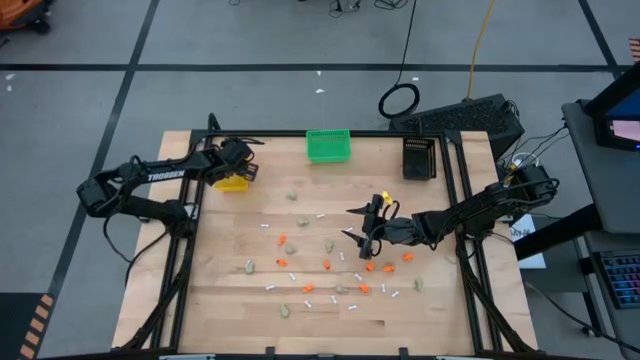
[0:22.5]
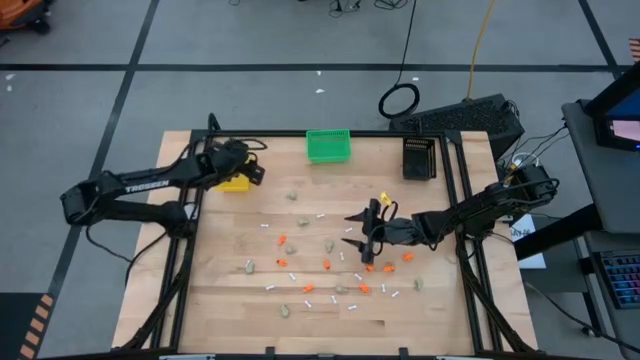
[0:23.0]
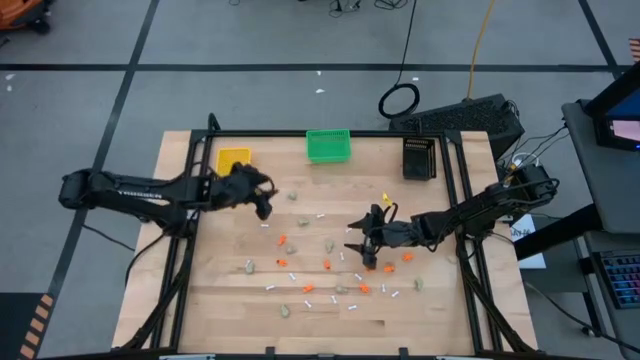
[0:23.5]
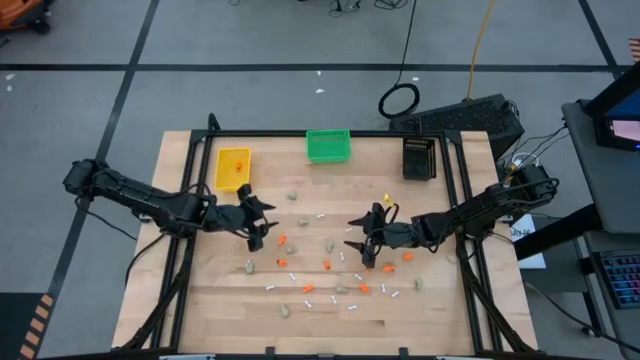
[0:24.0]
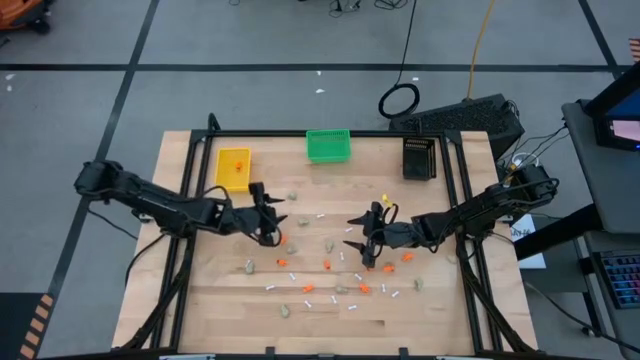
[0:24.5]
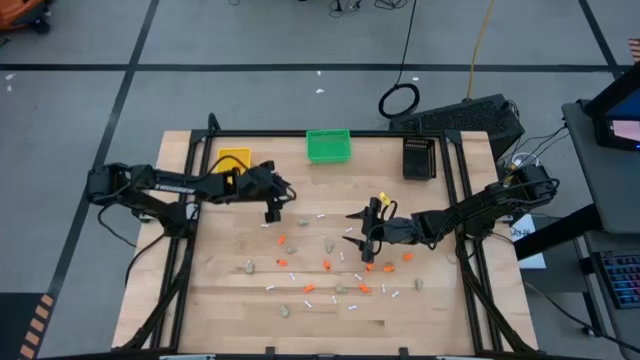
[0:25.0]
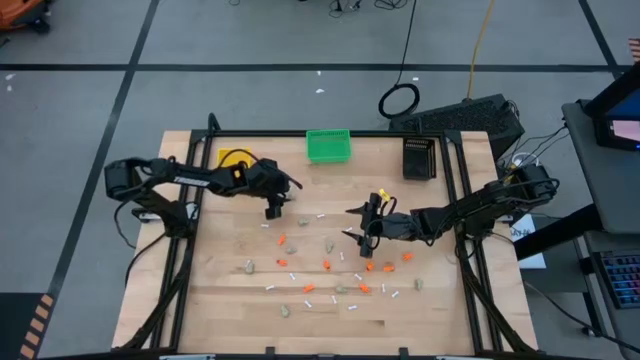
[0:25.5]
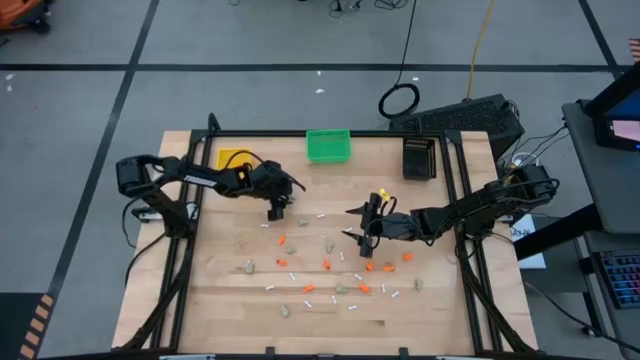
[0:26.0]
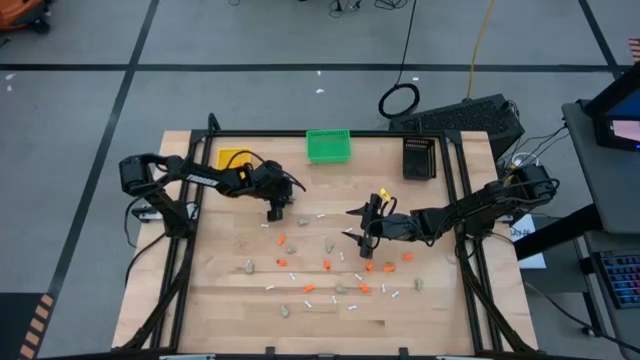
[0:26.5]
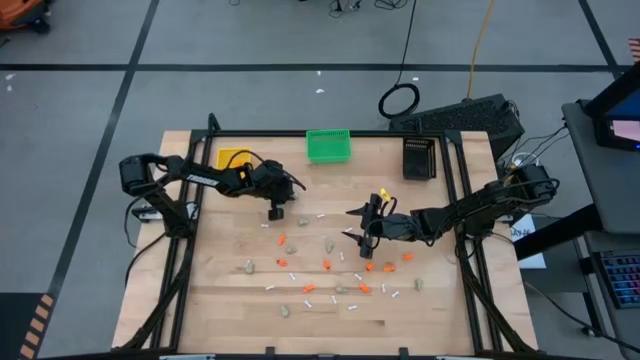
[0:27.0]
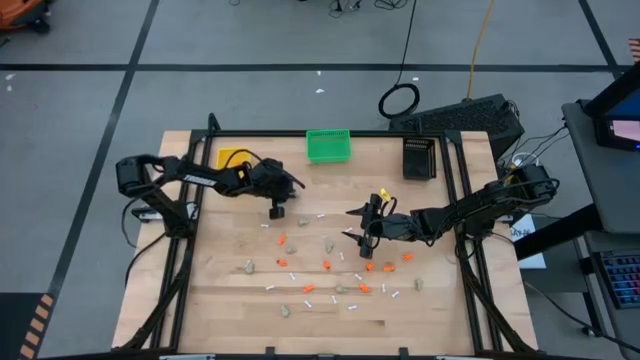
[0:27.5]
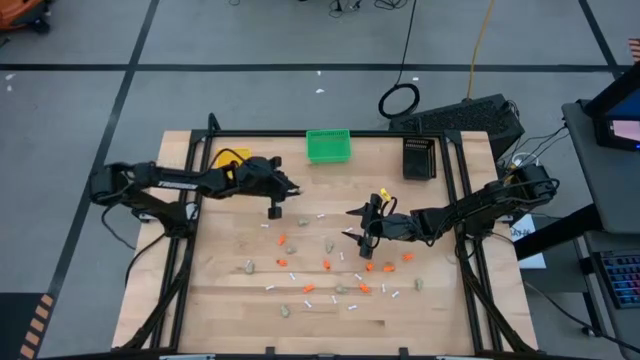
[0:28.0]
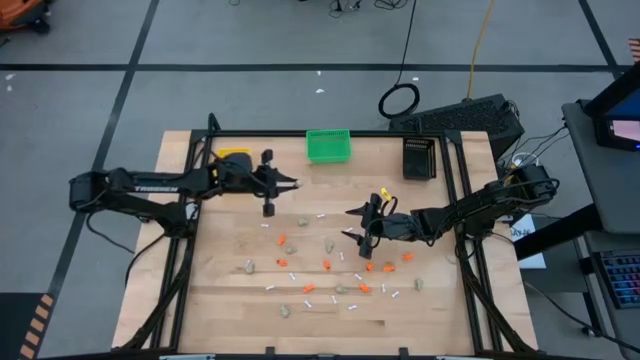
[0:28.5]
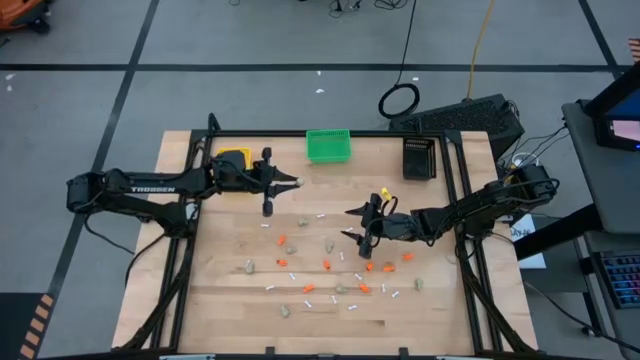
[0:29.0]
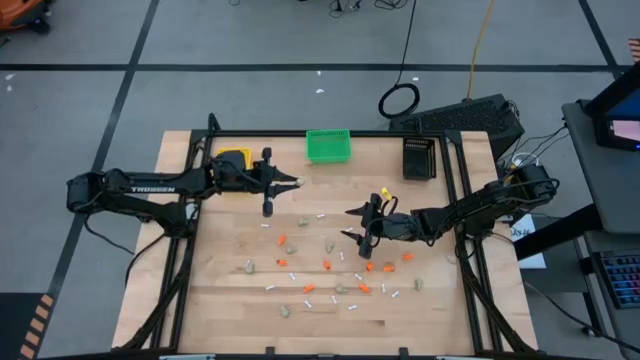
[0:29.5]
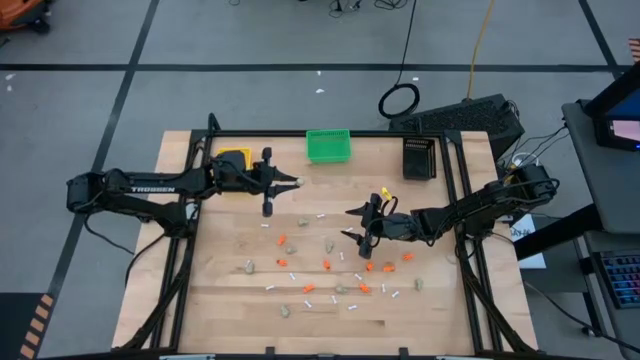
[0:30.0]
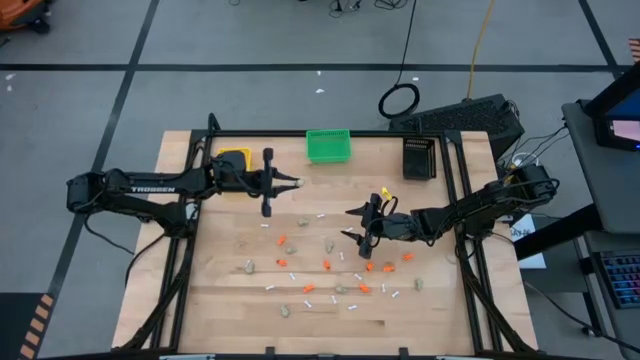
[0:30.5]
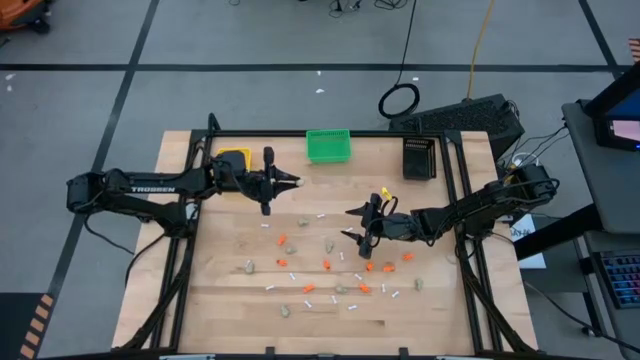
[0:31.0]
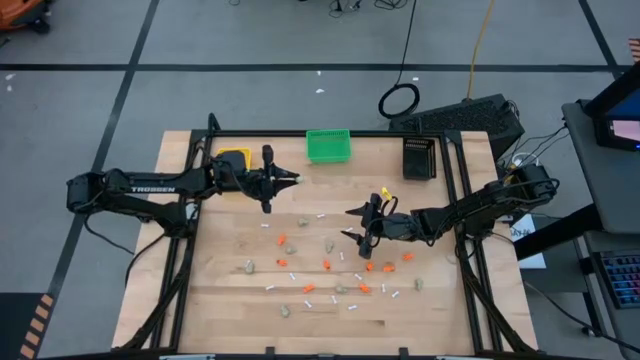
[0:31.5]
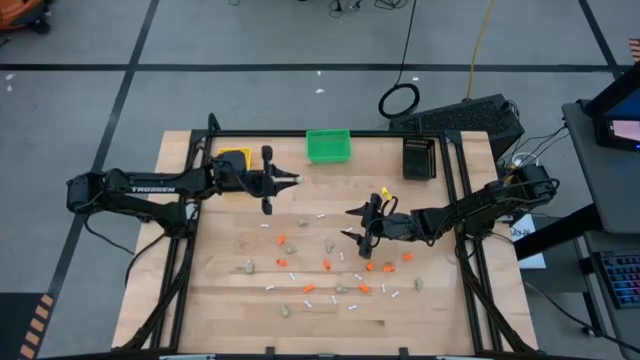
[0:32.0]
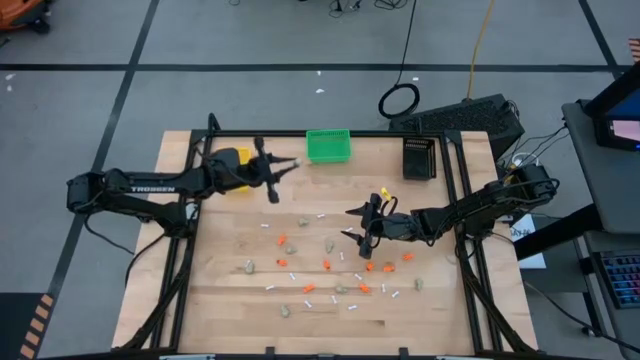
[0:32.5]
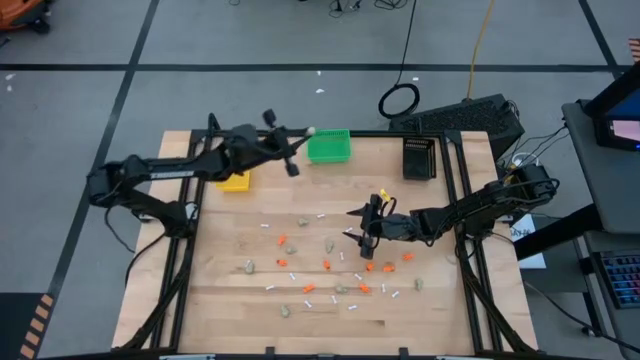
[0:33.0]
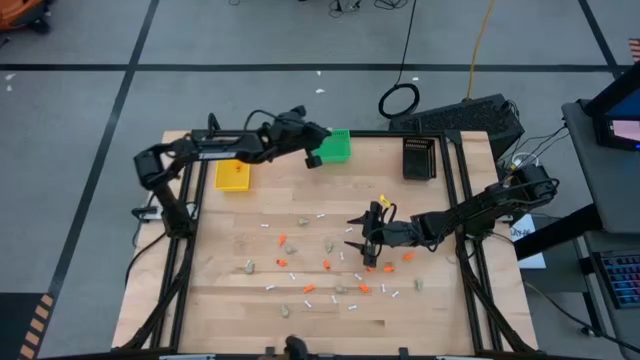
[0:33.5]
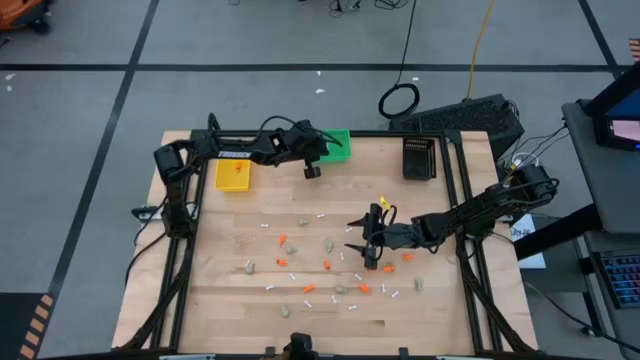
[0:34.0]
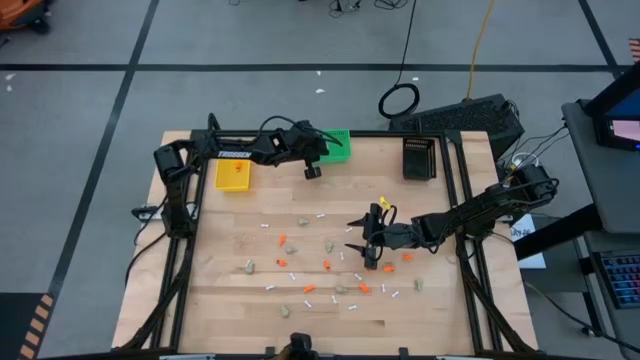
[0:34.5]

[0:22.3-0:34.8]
Task: Sort Halloween decoration
Put the gray skull toy into the green bin

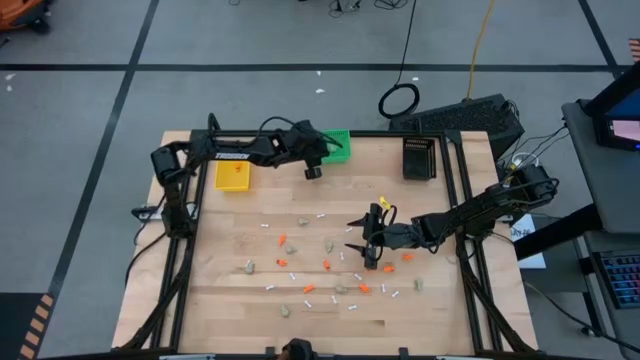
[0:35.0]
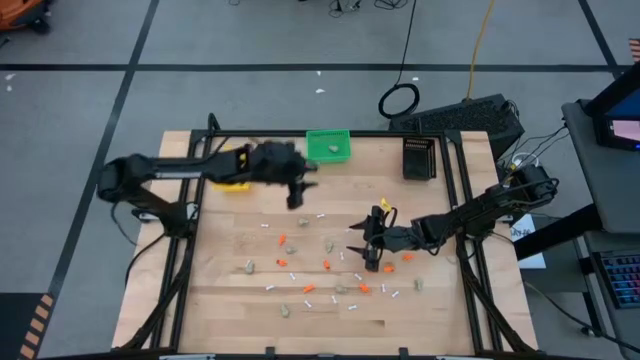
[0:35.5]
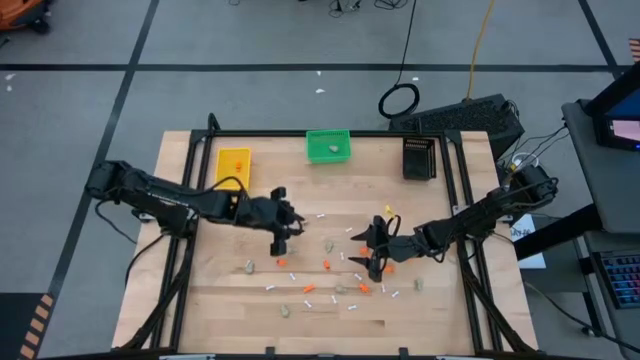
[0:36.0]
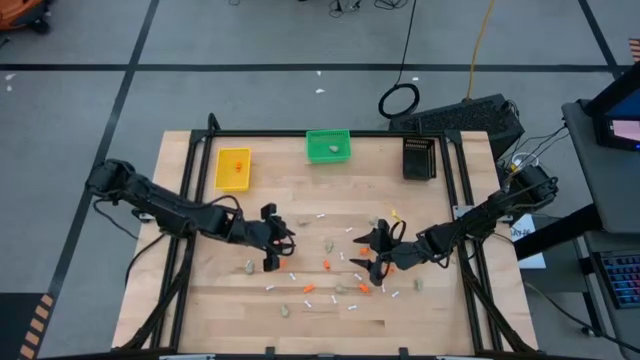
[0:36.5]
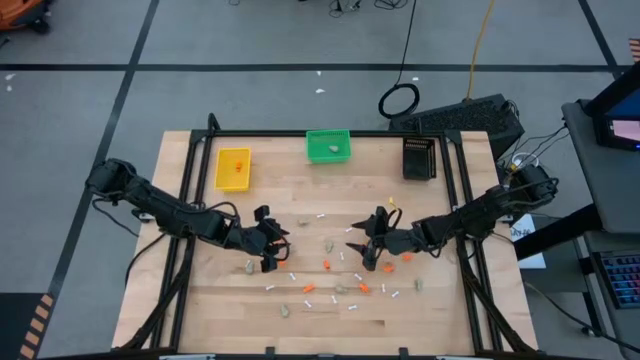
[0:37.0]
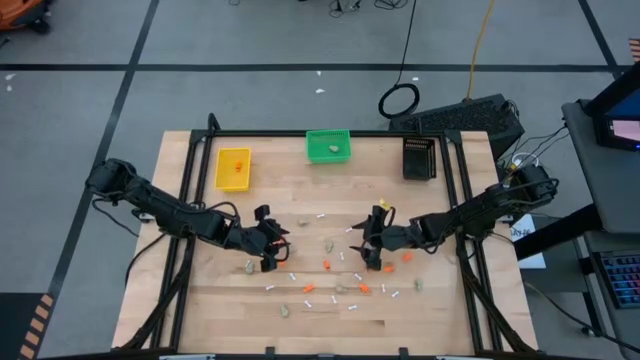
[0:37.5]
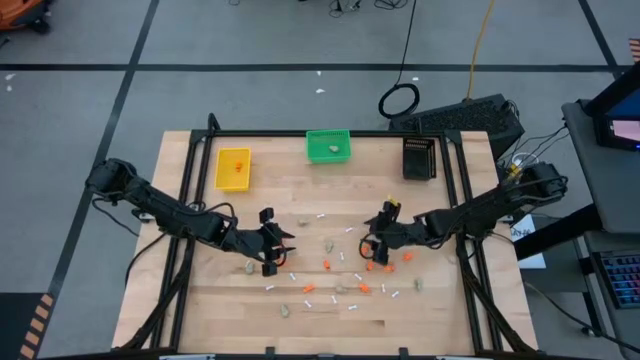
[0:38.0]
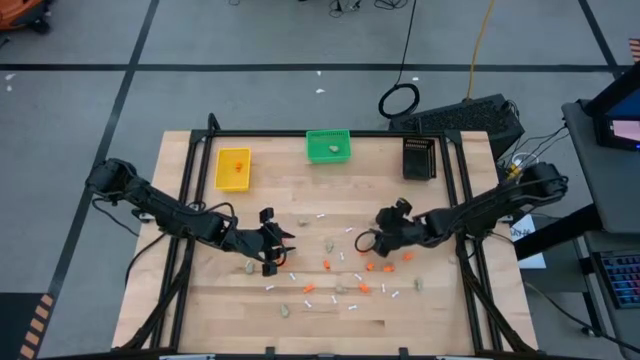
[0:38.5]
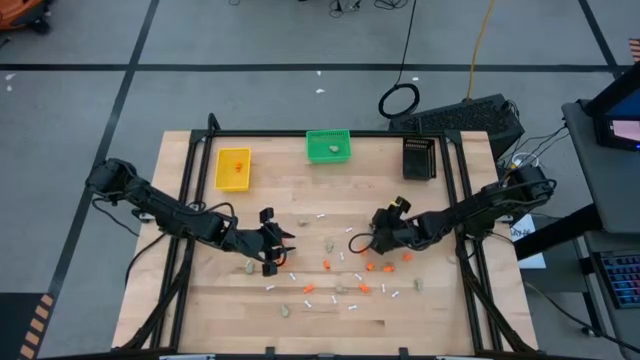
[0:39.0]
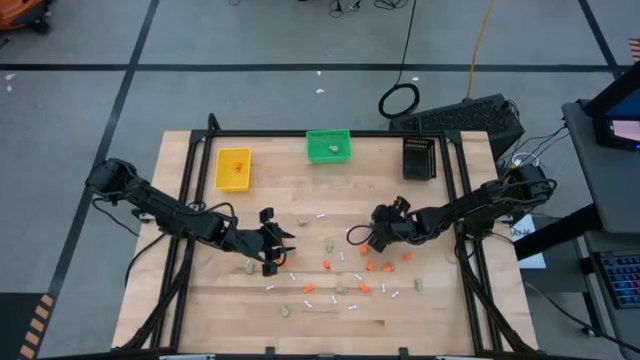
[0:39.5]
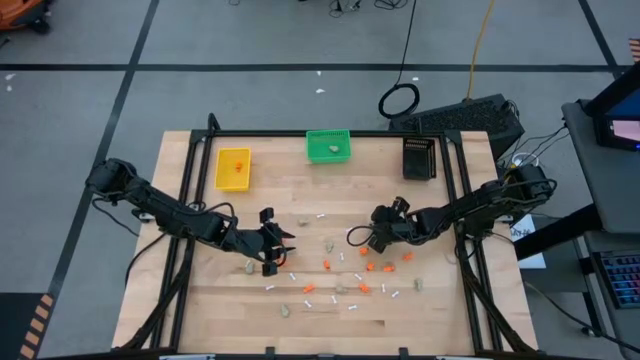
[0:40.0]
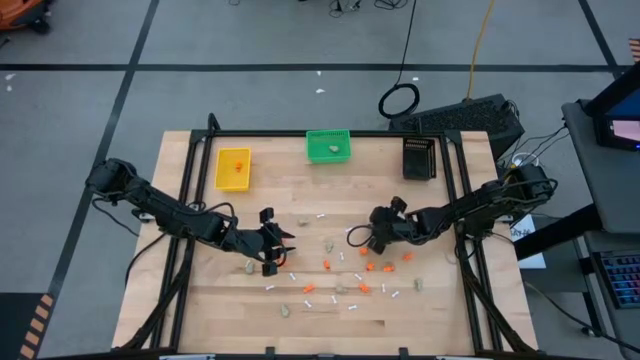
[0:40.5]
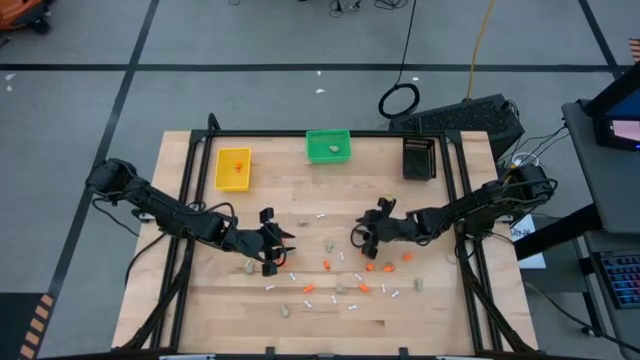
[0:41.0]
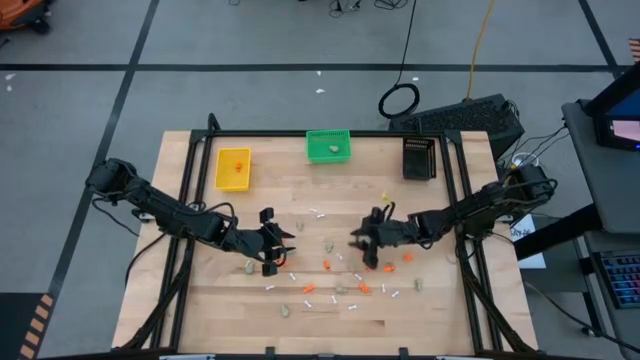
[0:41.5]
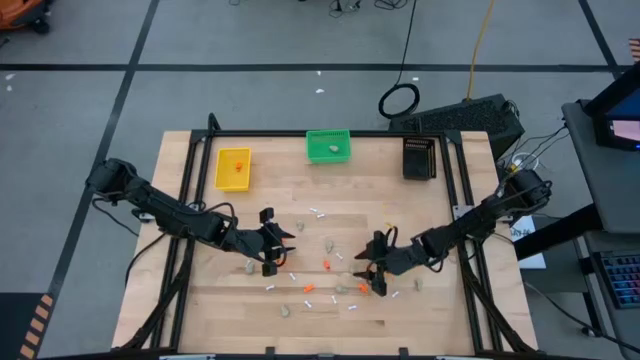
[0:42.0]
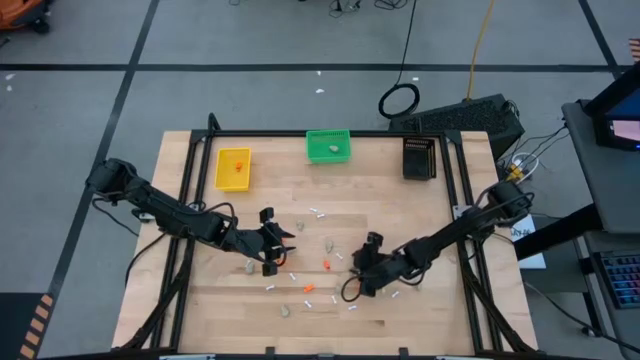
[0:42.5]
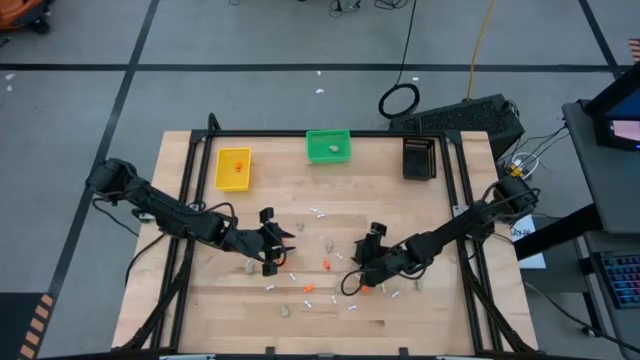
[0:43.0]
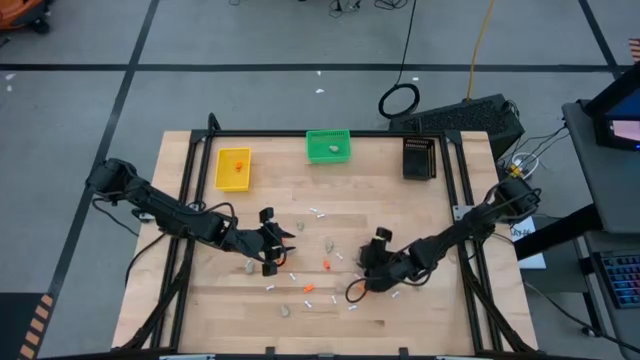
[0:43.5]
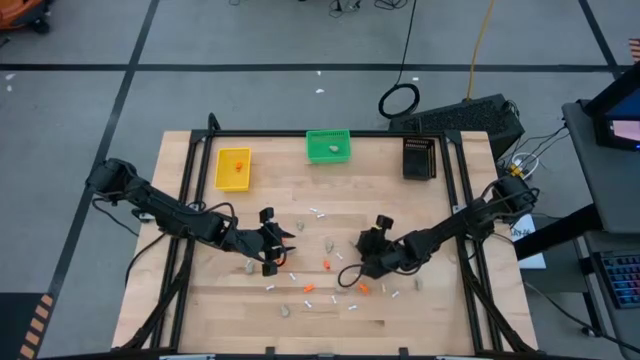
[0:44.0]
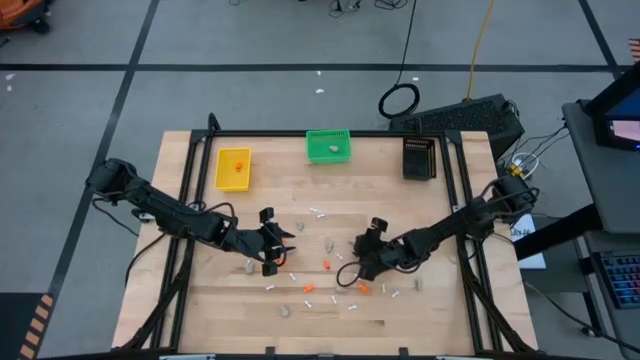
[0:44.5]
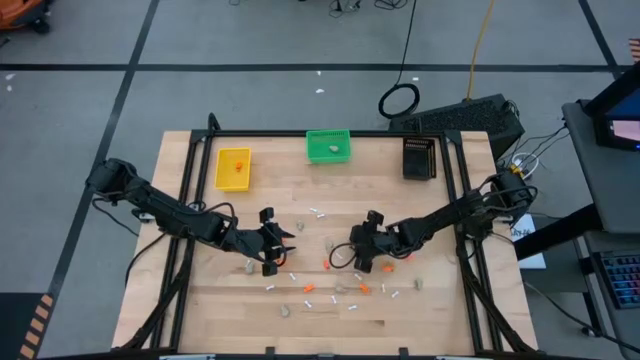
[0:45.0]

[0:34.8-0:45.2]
Put the gray skull toy into the green bin
